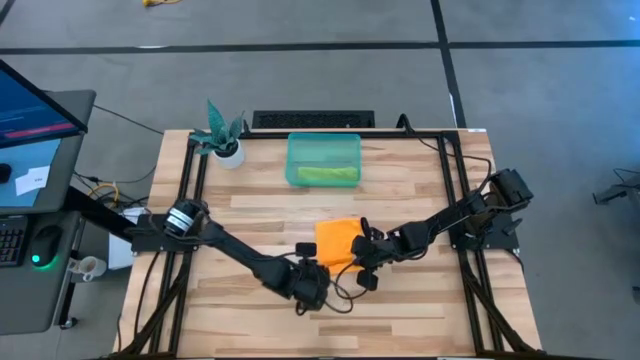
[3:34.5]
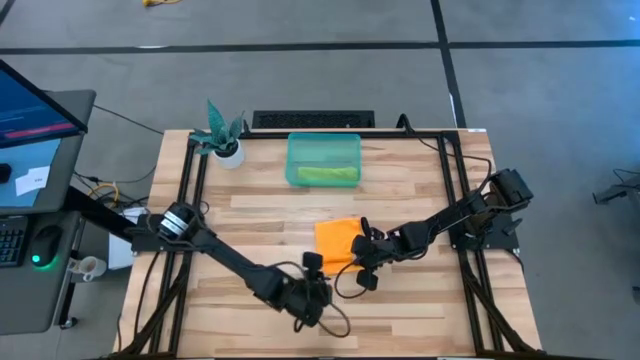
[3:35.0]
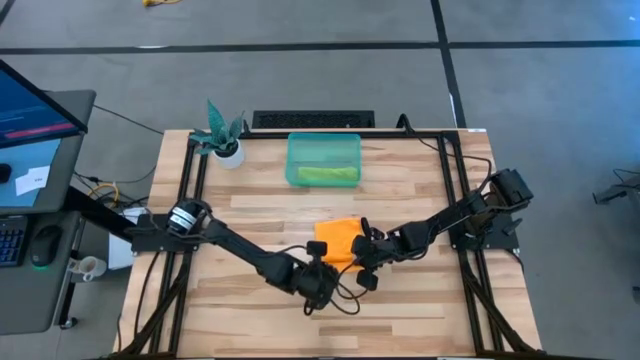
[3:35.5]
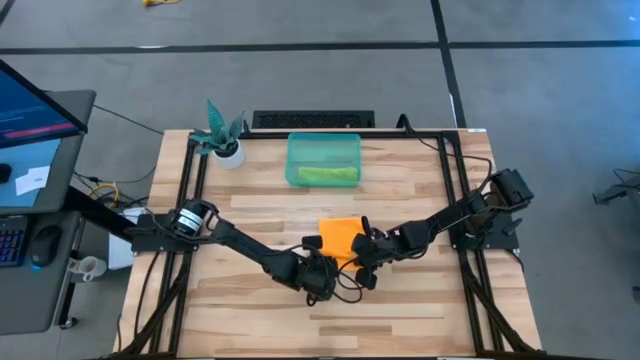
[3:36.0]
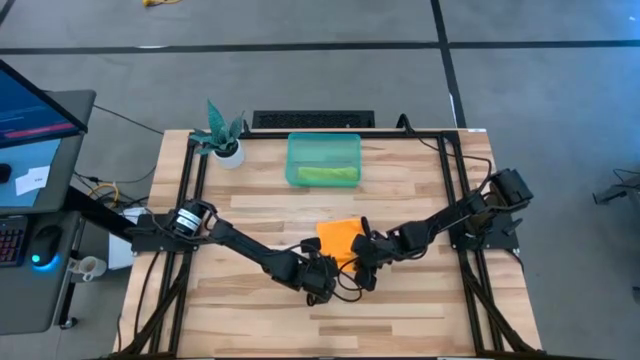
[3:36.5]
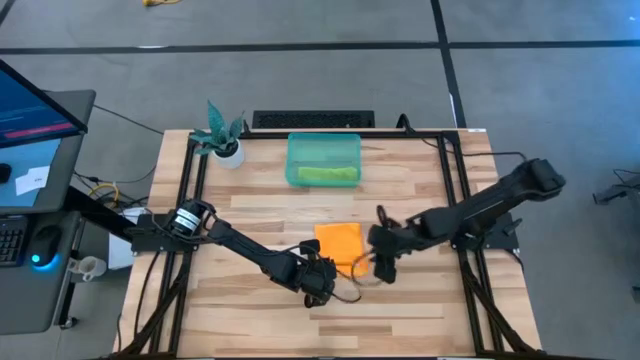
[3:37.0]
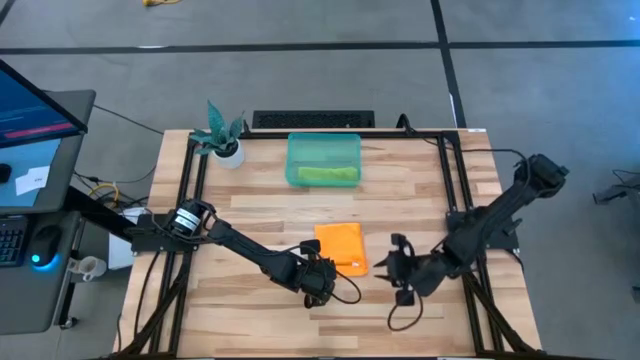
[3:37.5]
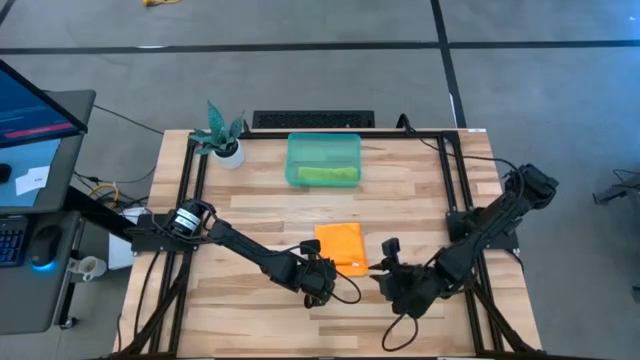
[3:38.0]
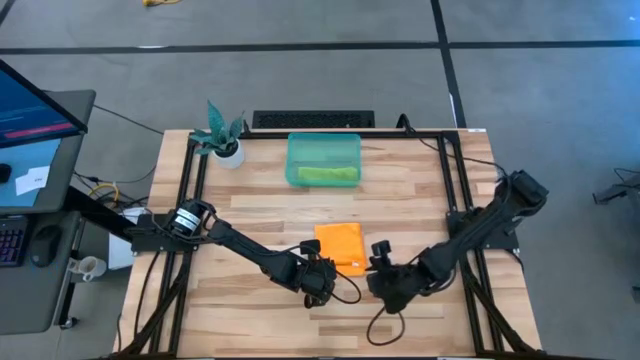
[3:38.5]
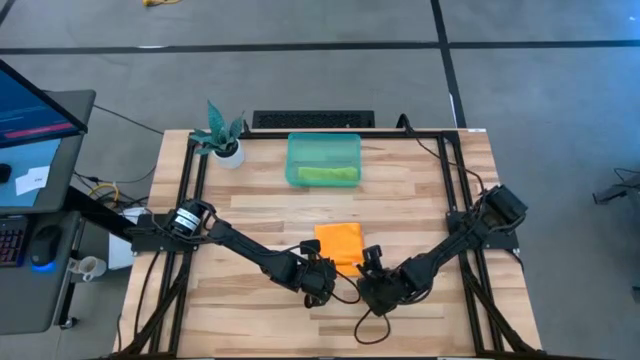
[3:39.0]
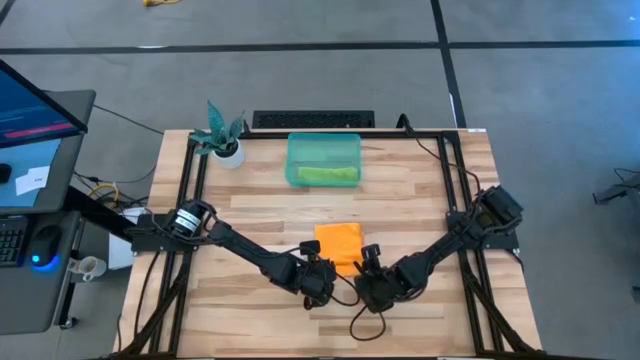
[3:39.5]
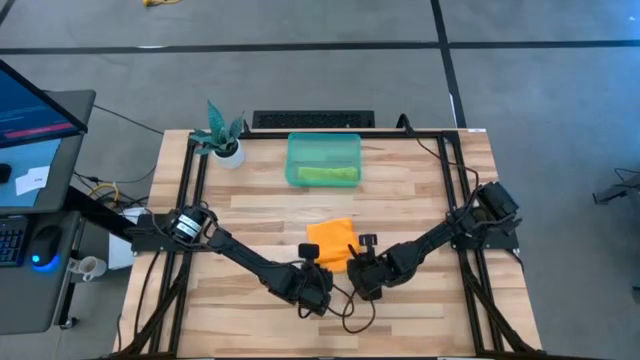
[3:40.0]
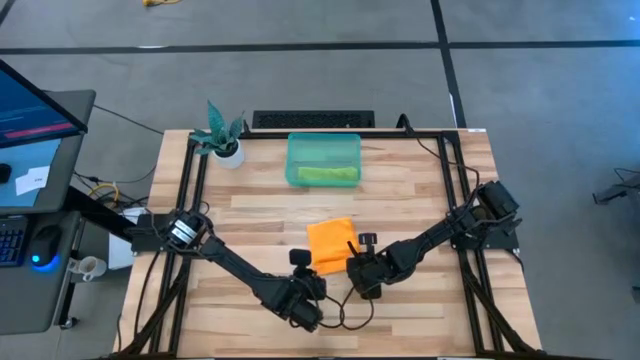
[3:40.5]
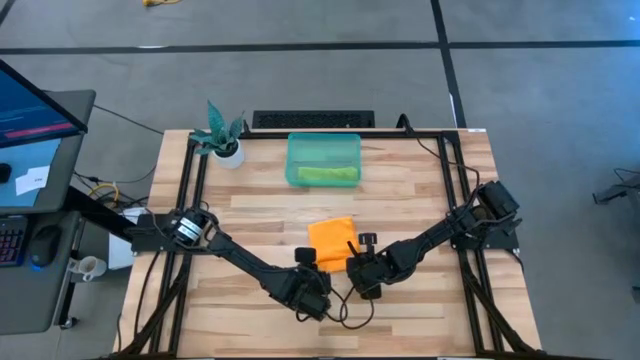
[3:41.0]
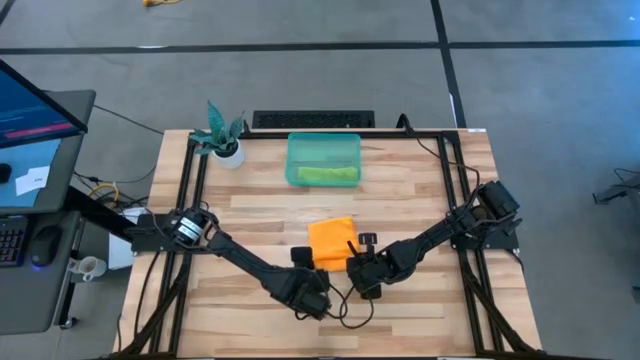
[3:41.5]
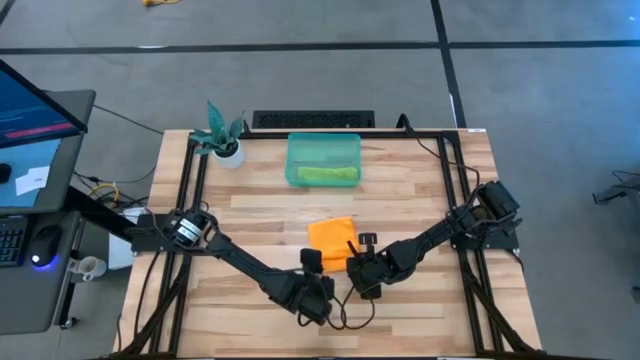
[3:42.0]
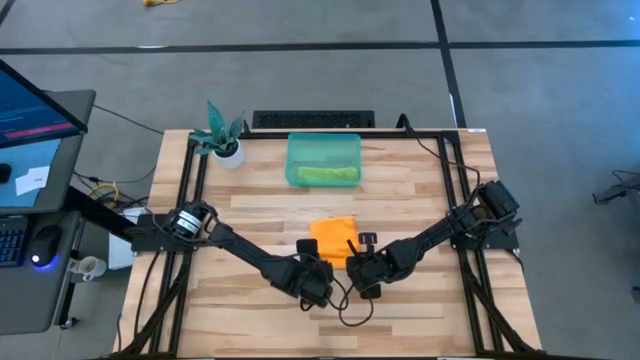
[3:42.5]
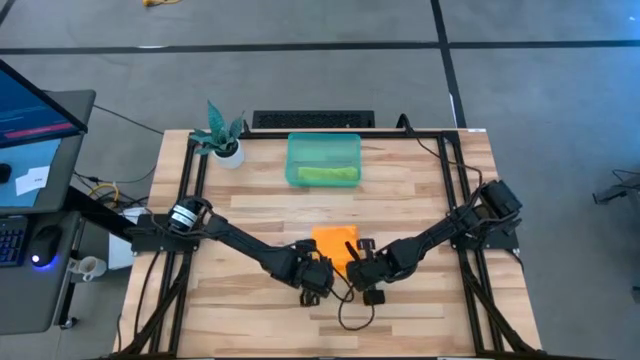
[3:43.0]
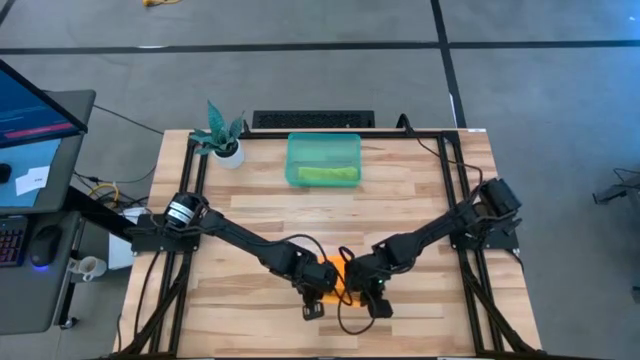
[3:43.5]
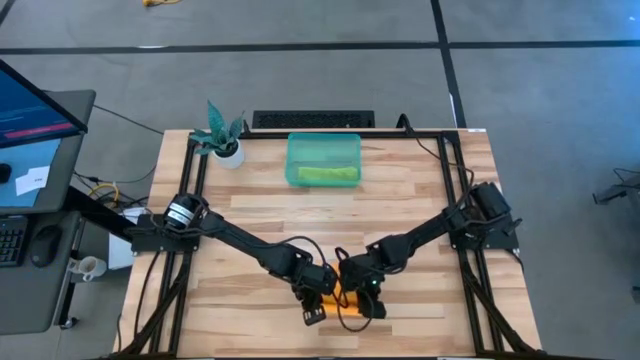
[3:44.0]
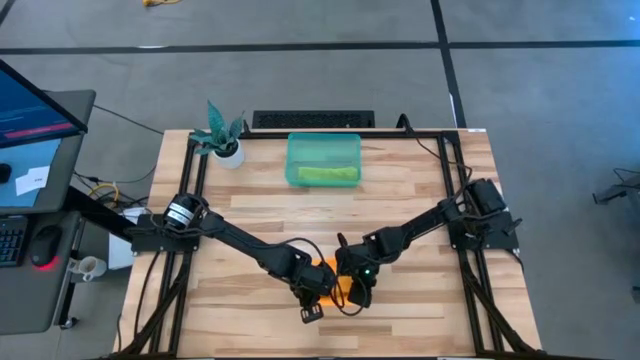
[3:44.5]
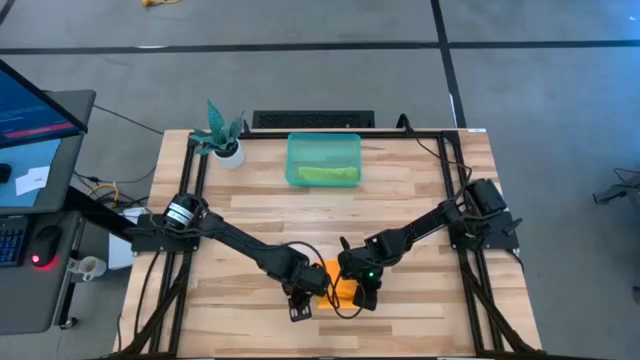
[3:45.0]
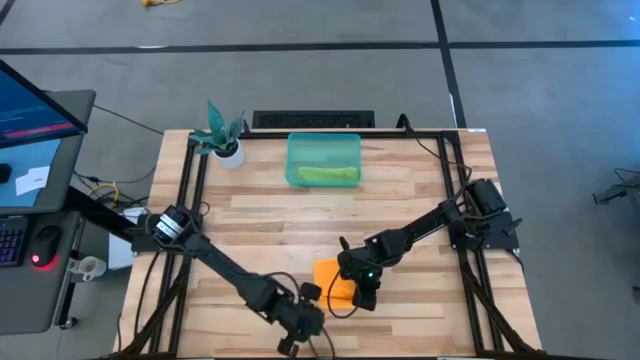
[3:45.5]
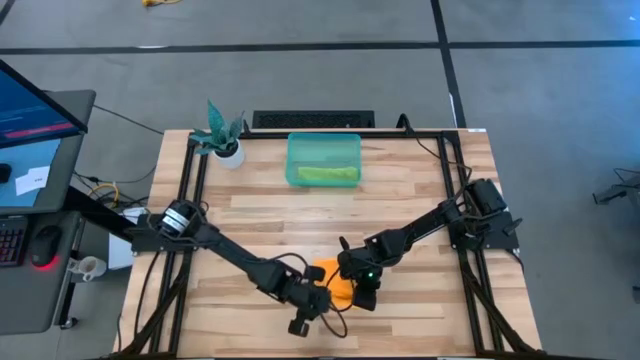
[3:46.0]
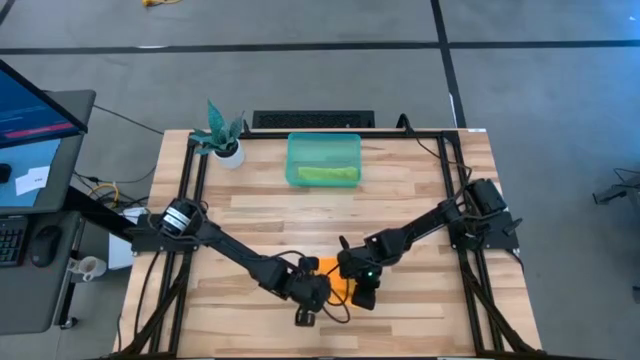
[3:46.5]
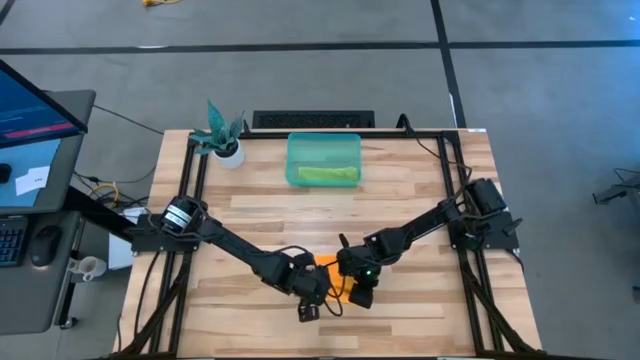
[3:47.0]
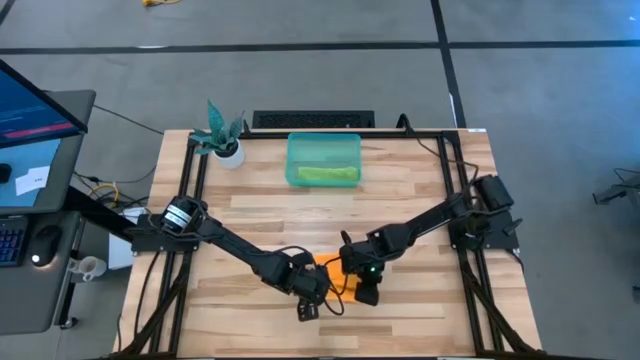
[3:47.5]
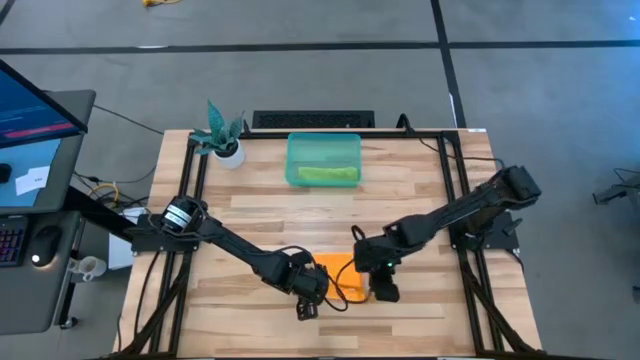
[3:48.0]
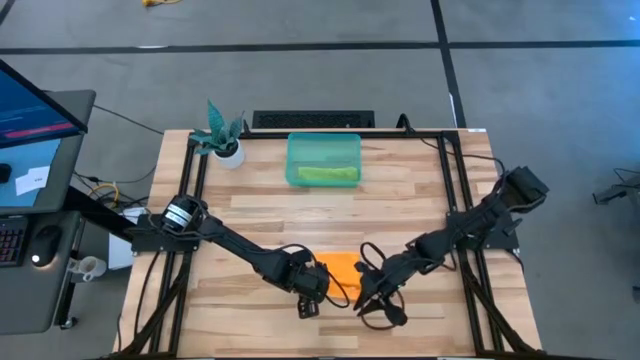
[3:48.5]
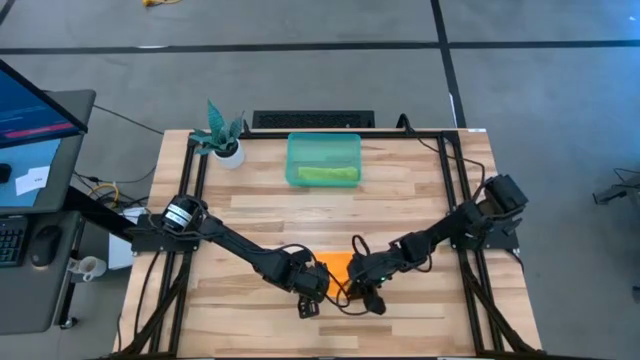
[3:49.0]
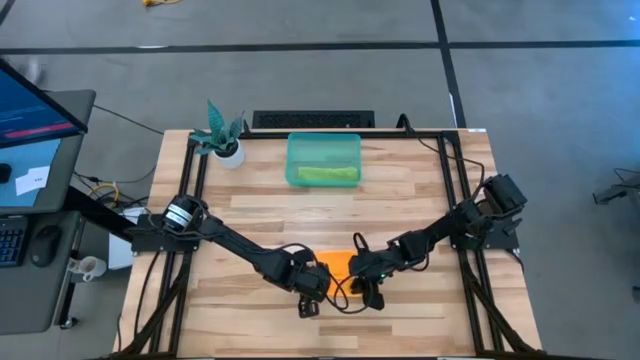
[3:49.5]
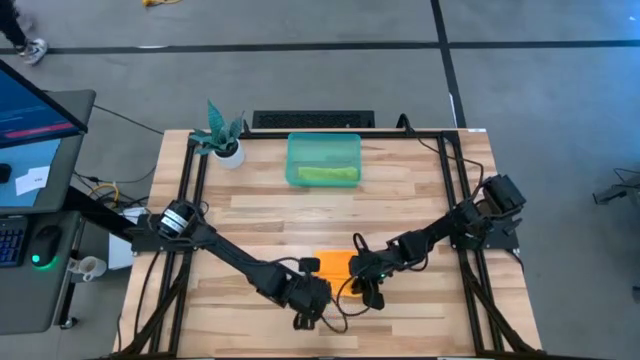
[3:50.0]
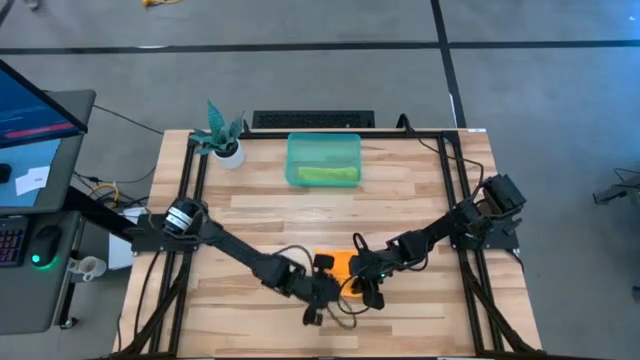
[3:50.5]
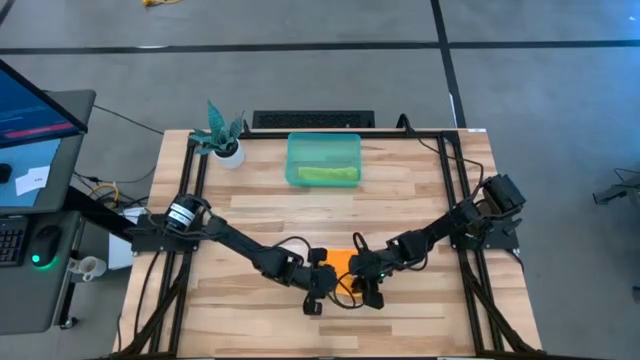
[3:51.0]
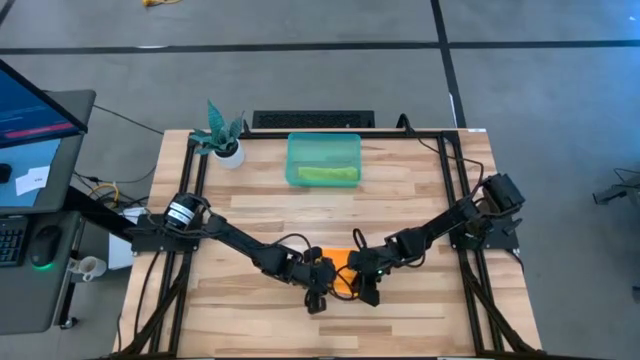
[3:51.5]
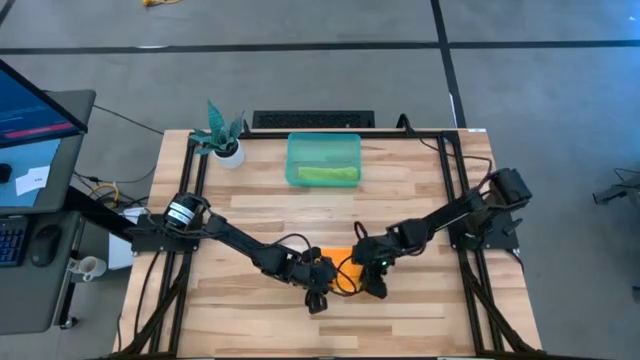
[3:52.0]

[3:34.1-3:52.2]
Task: Roll microfiber towels into tight, uniform cylinder then place into a basket
Roll the orange towel

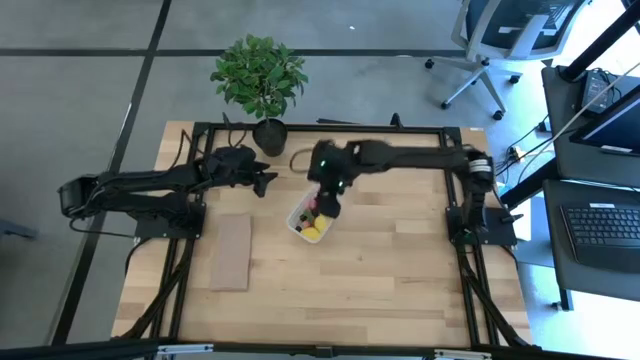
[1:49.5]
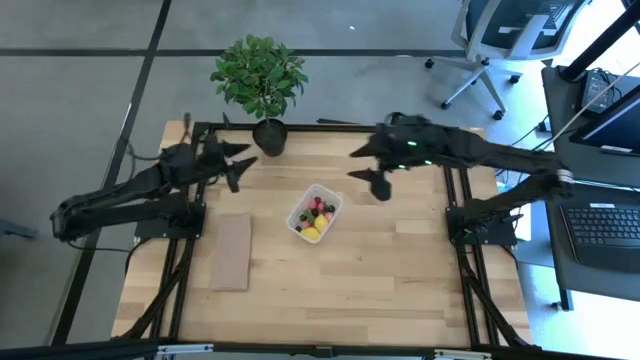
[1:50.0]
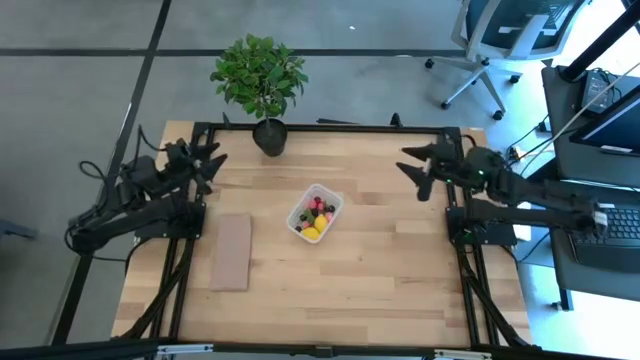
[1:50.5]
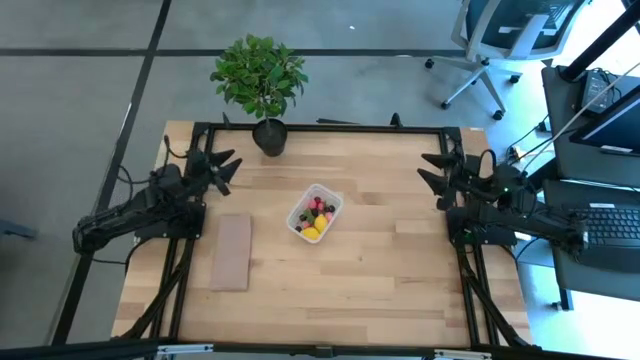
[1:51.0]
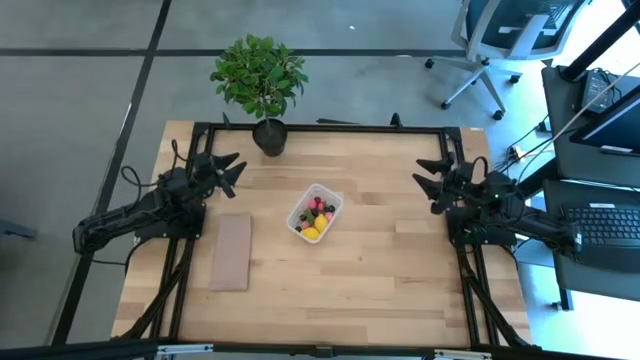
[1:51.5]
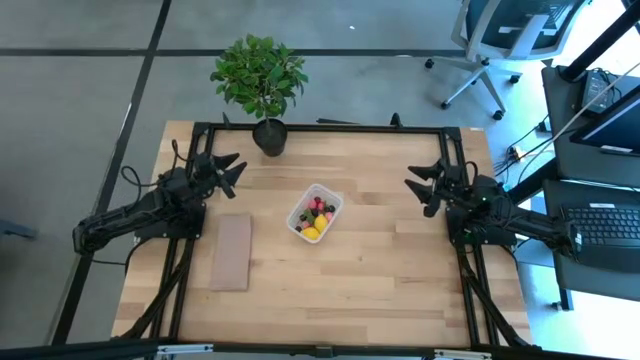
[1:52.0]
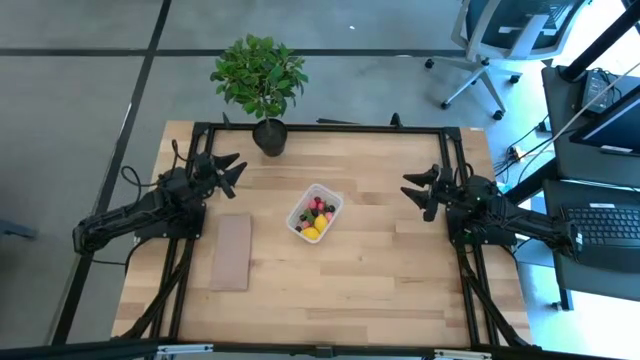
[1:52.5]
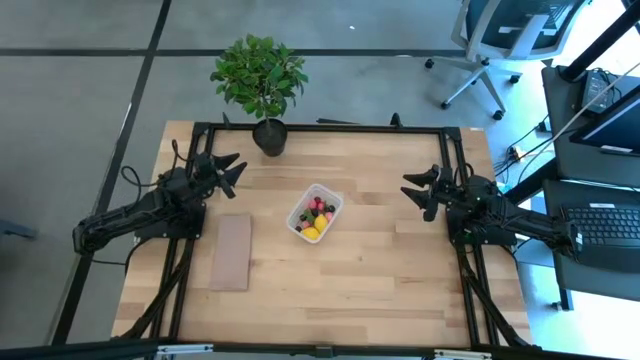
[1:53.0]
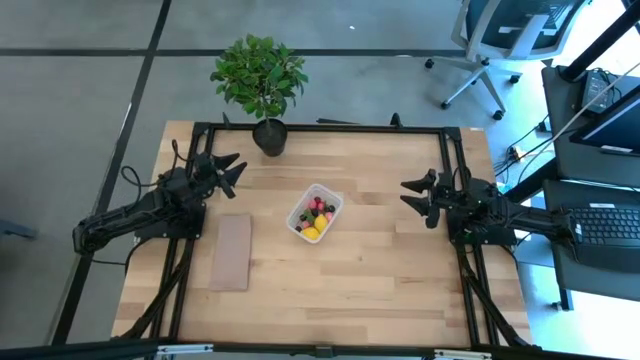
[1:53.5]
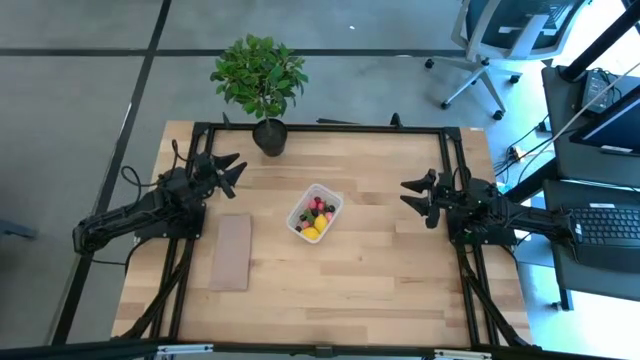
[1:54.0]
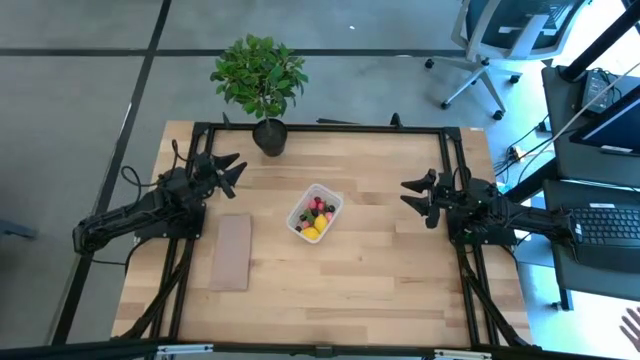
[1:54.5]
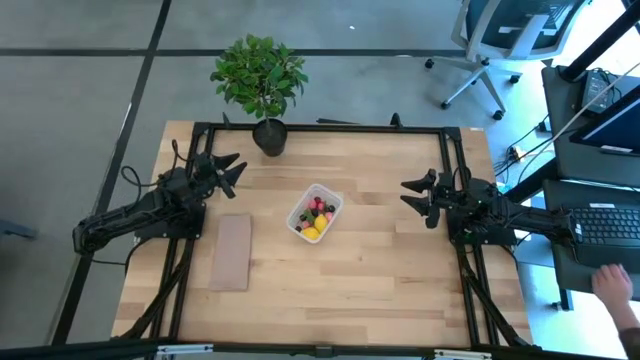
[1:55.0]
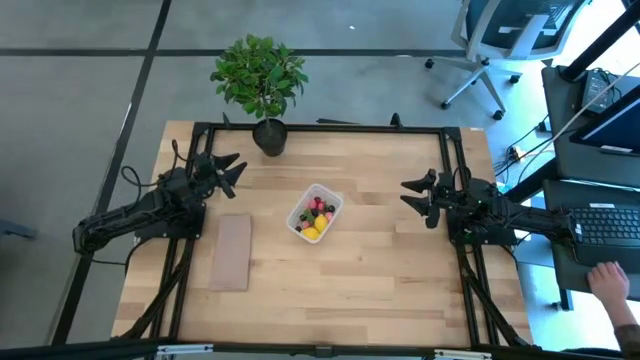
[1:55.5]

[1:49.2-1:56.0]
Task: Pick and placing Produce into tupperware
Return to Home Position
